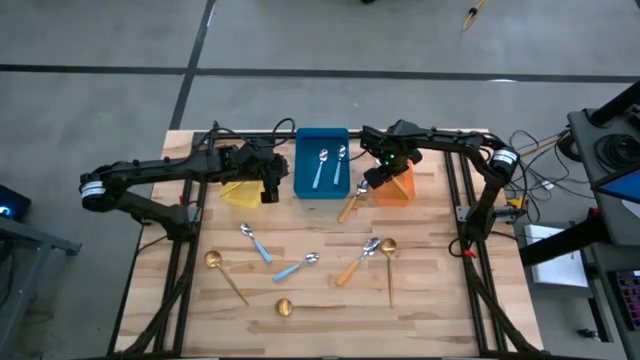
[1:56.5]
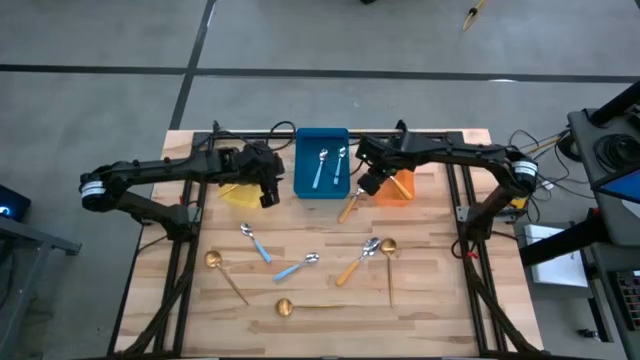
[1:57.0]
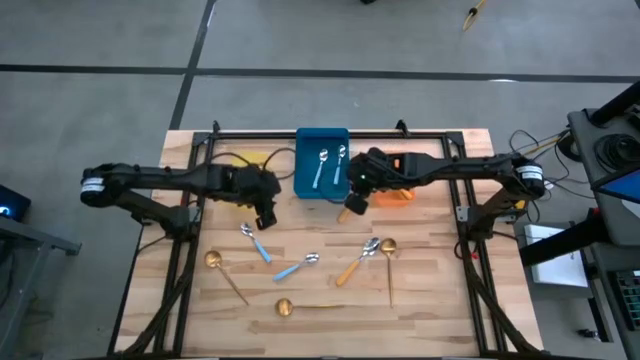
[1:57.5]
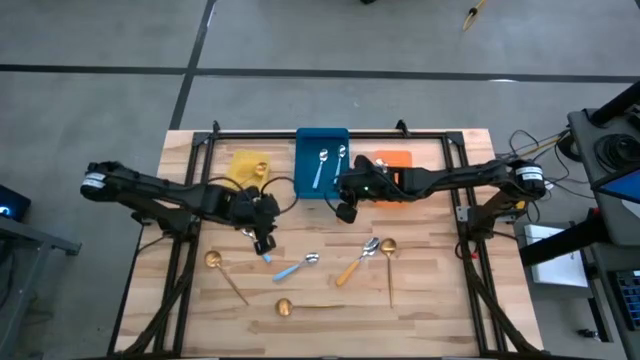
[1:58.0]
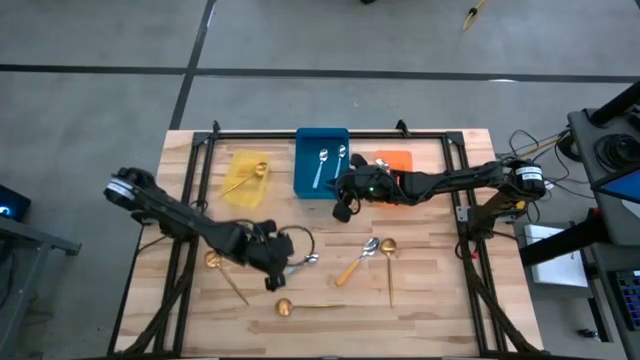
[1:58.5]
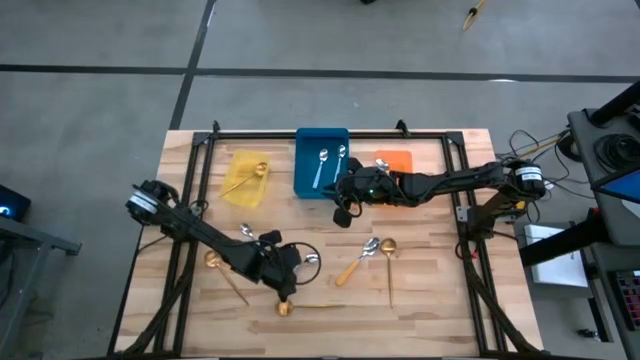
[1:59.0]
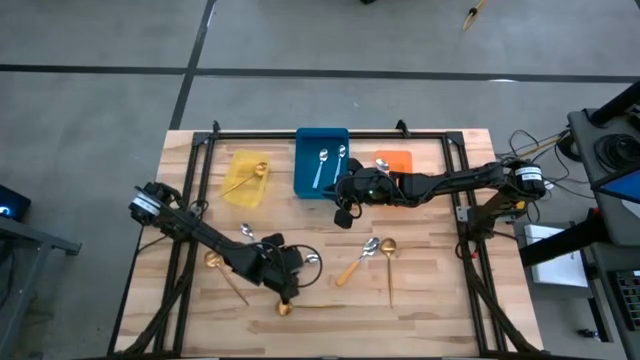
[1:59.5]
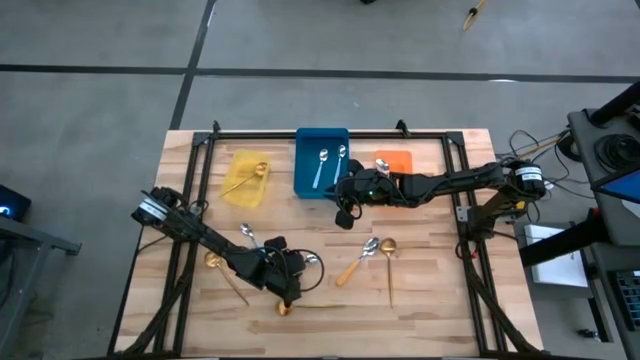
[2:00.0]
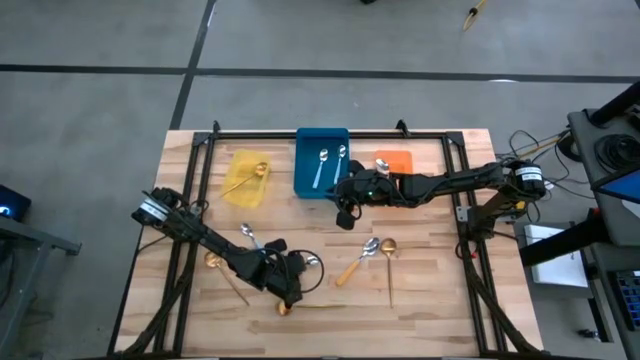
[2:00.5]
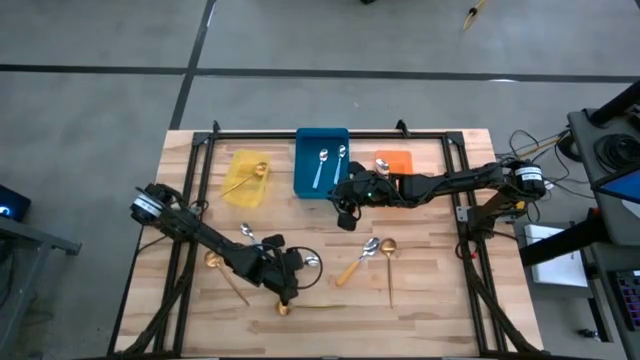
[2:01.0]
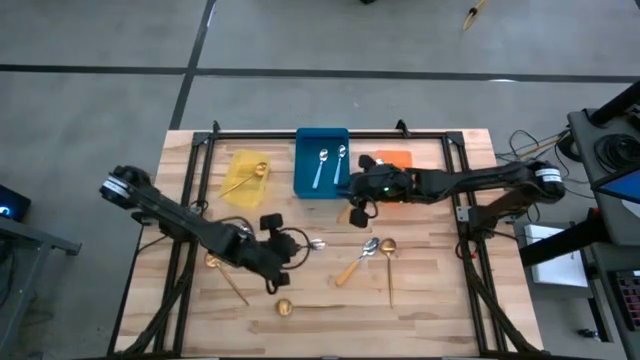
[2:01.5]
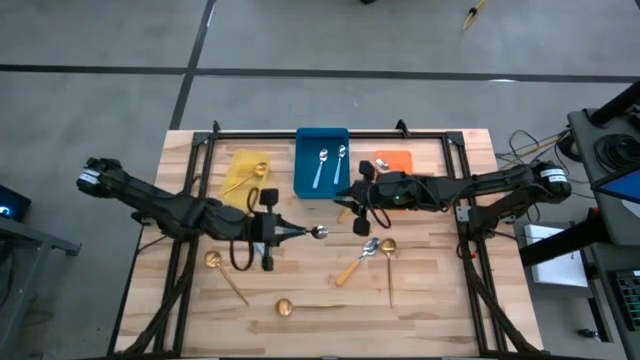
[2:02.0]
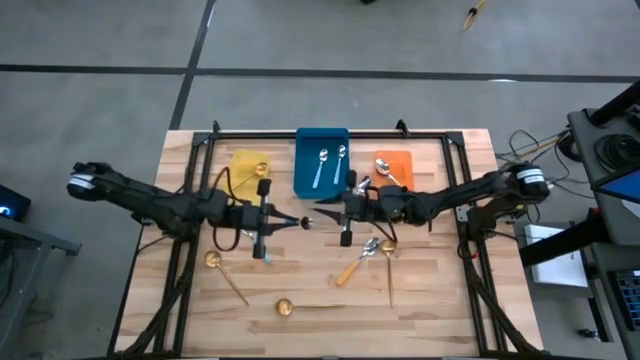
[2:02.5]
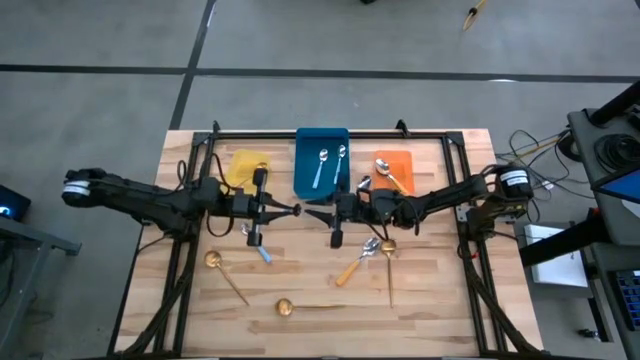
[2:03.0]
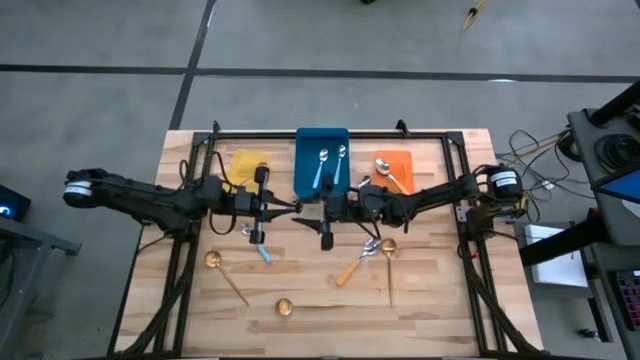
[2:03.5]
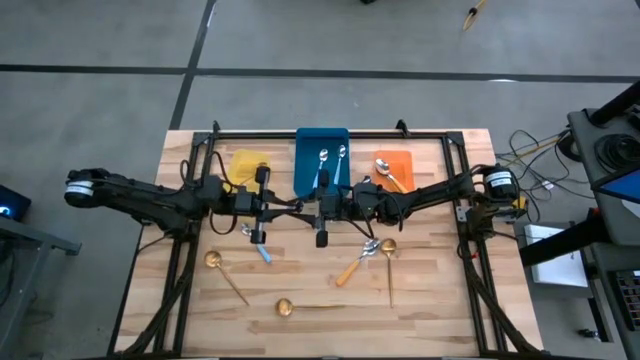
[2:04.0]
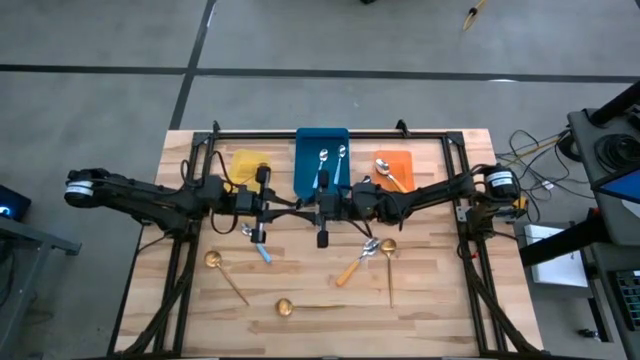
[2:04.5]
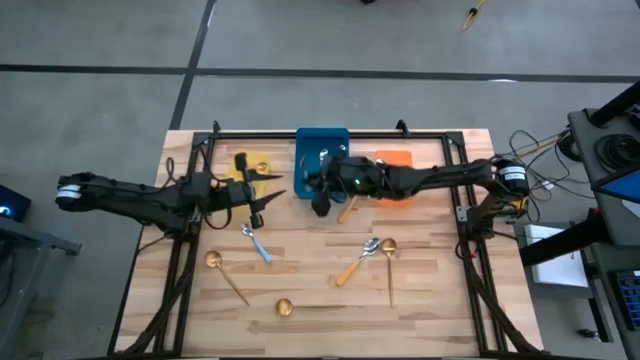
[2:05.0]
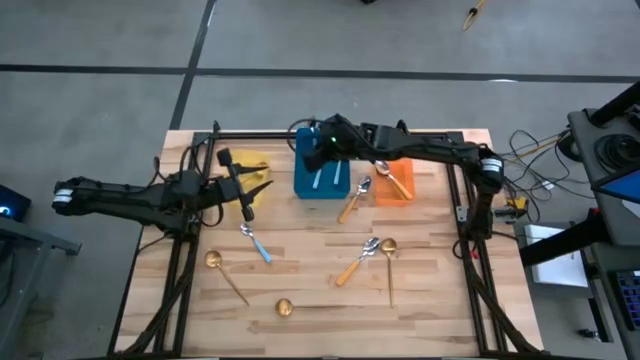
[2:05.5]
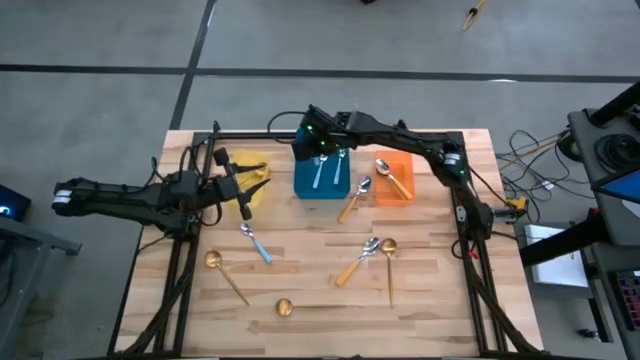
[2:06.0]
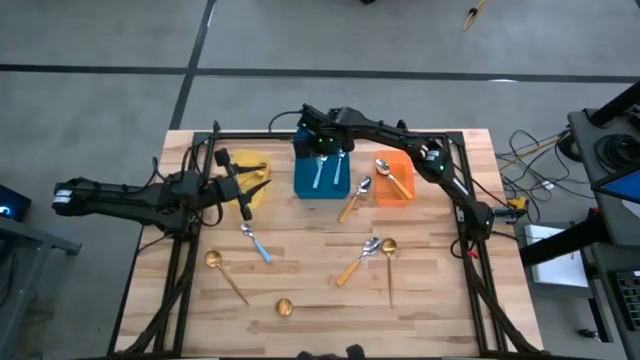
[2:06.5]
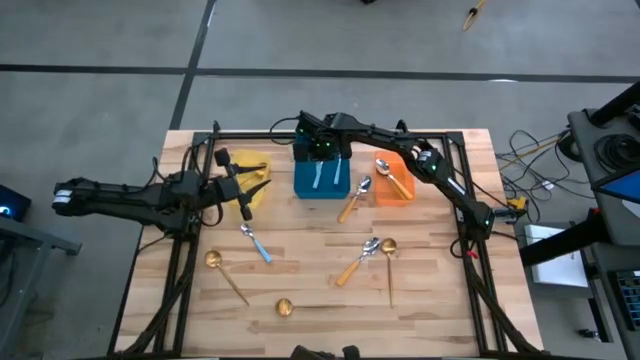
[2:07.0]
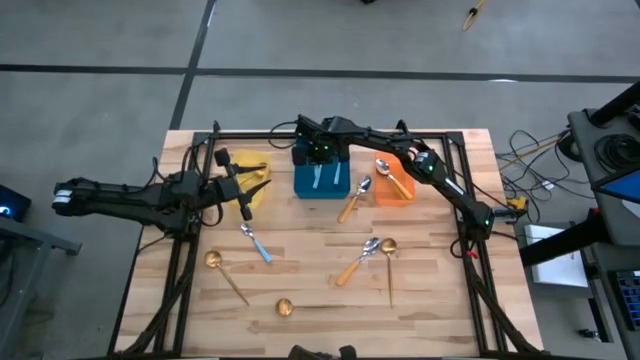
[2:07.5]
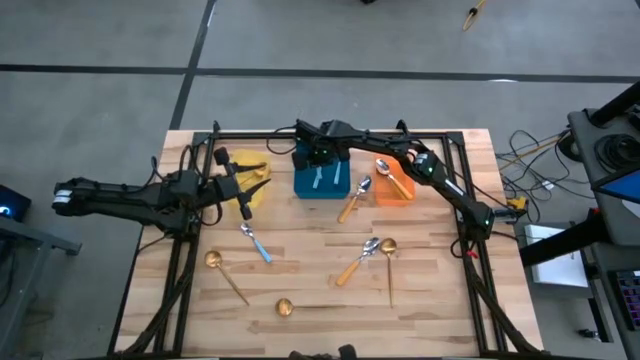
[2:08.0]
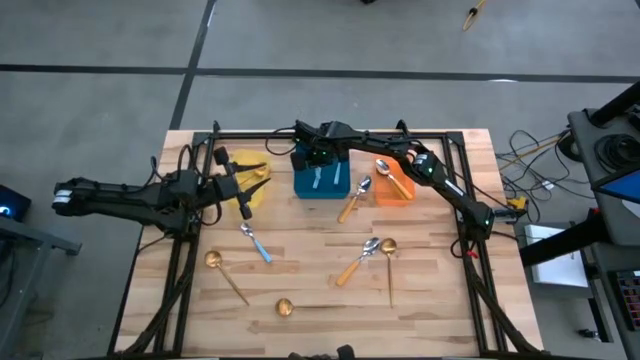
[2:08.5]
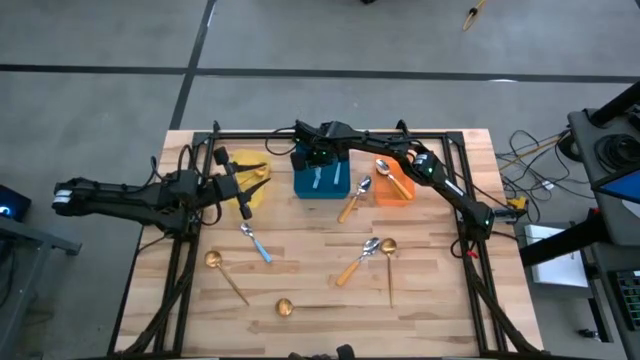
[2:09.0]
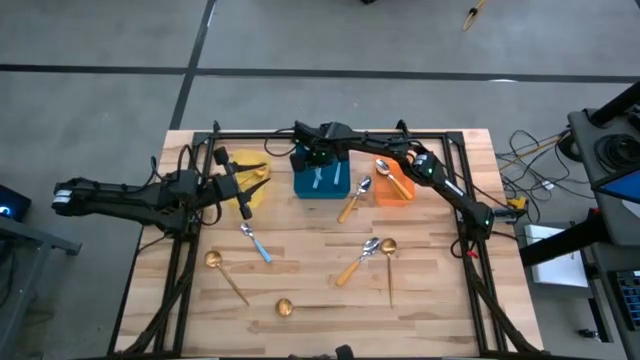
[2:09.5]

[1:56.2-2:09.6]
Task: Sort silverware by color (type)
Put the blue spoon into the blue bin

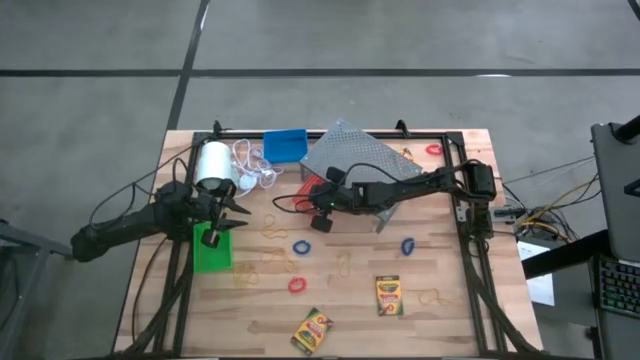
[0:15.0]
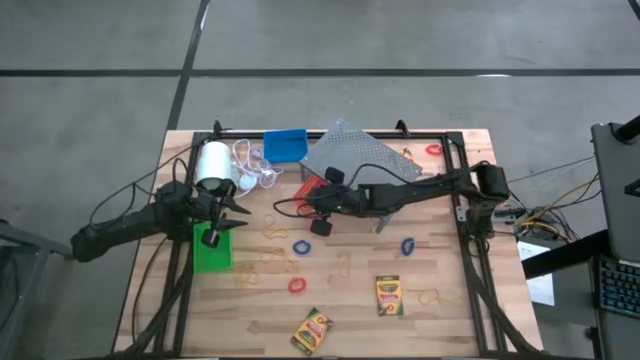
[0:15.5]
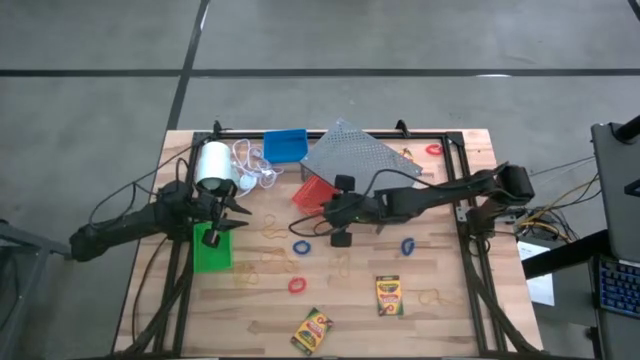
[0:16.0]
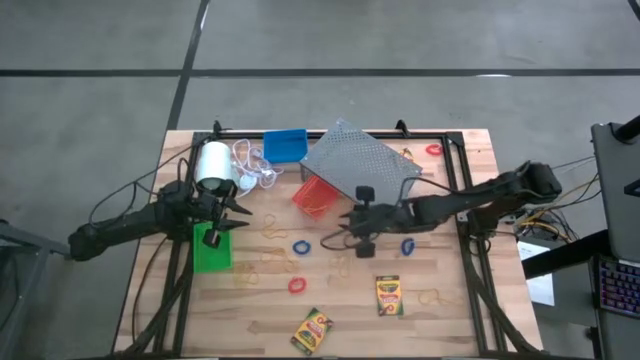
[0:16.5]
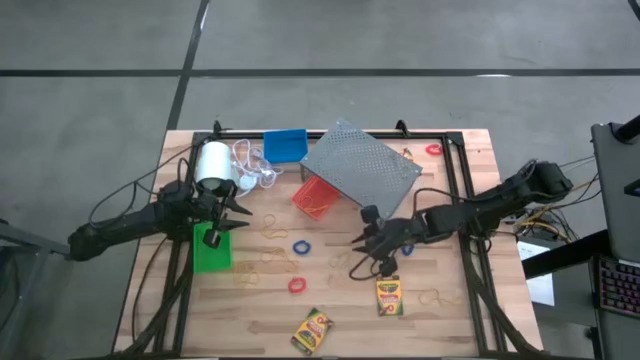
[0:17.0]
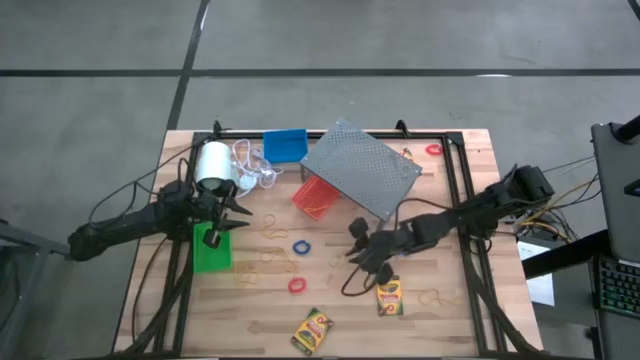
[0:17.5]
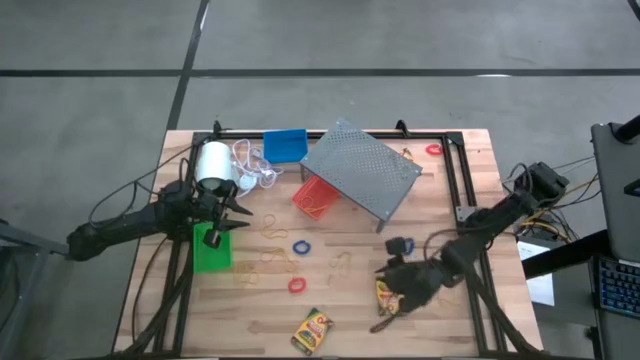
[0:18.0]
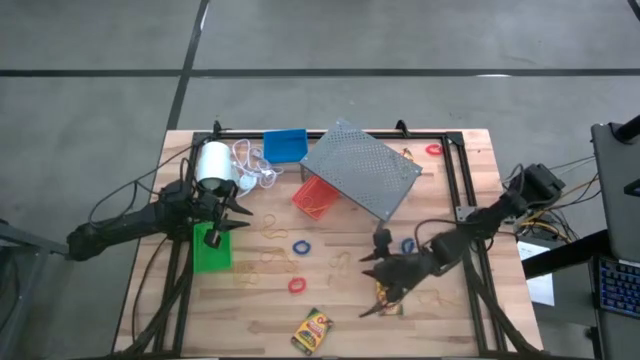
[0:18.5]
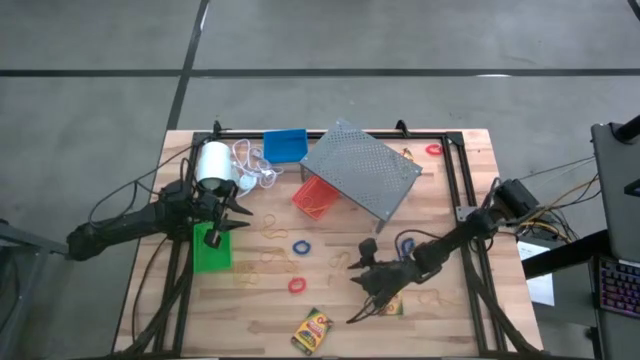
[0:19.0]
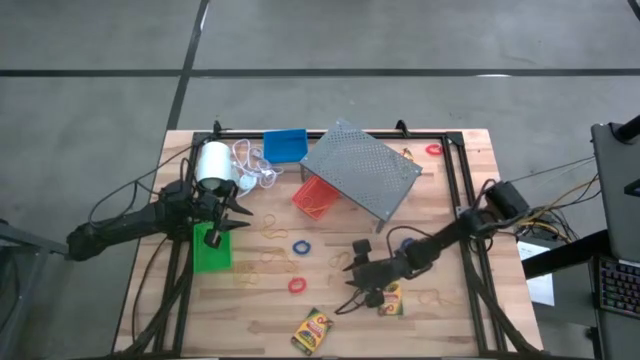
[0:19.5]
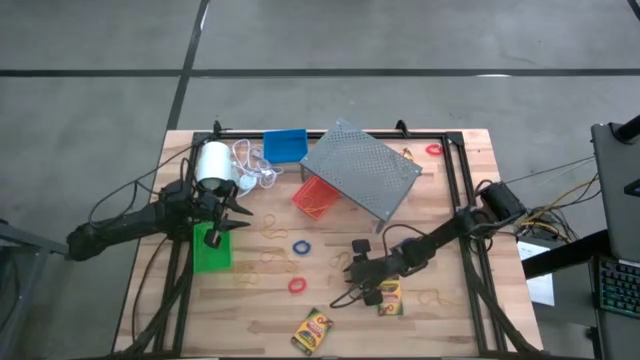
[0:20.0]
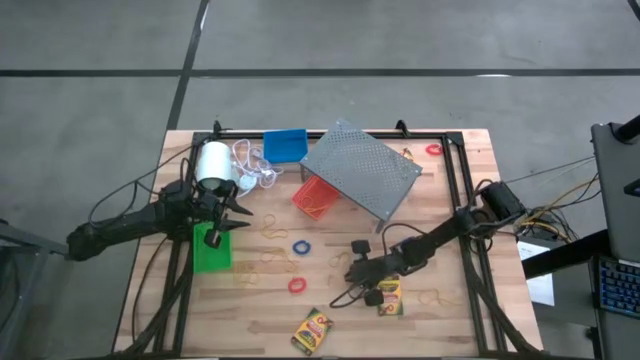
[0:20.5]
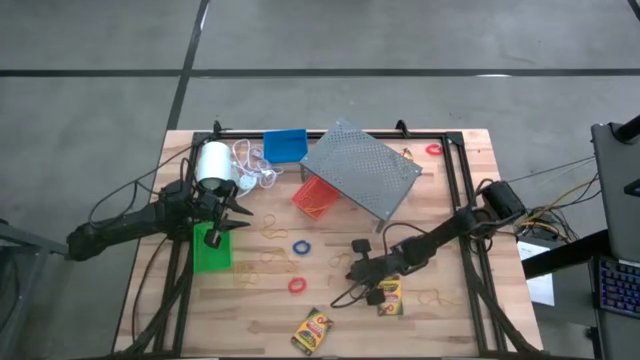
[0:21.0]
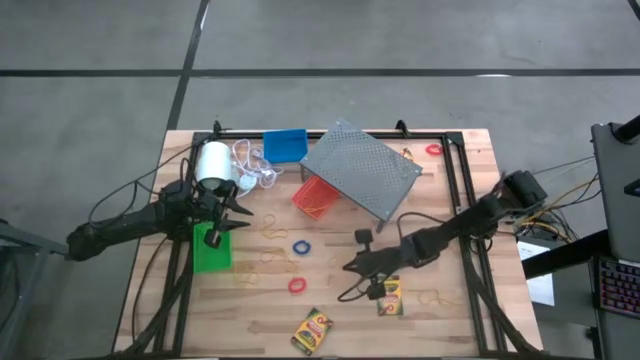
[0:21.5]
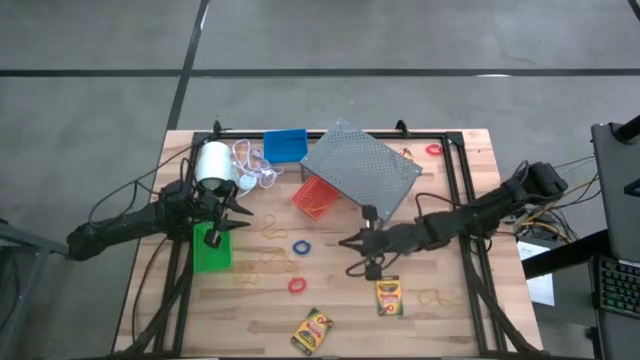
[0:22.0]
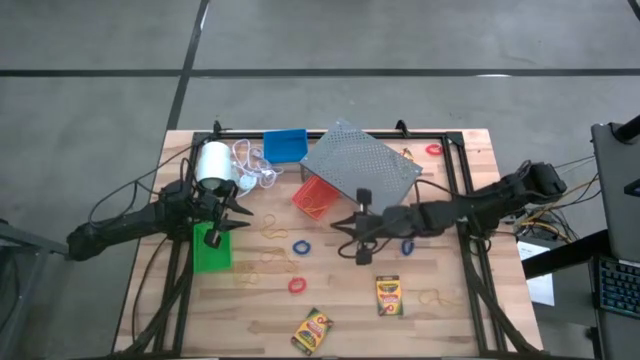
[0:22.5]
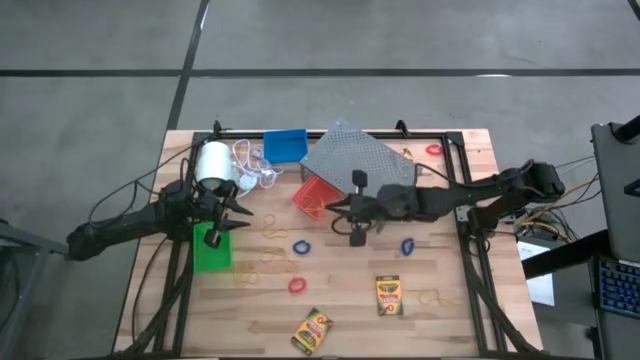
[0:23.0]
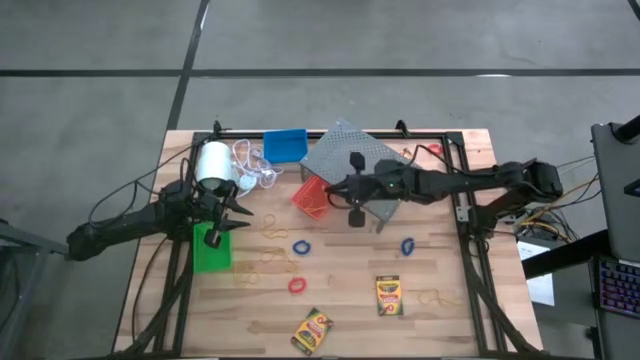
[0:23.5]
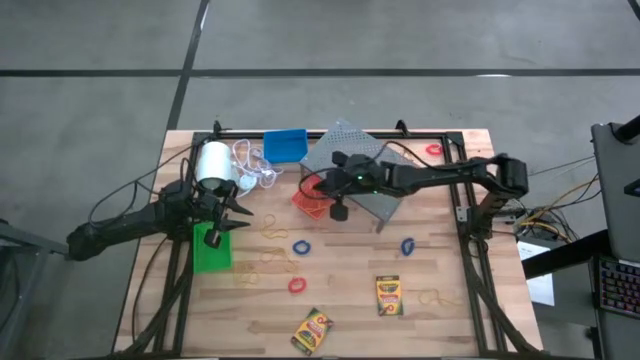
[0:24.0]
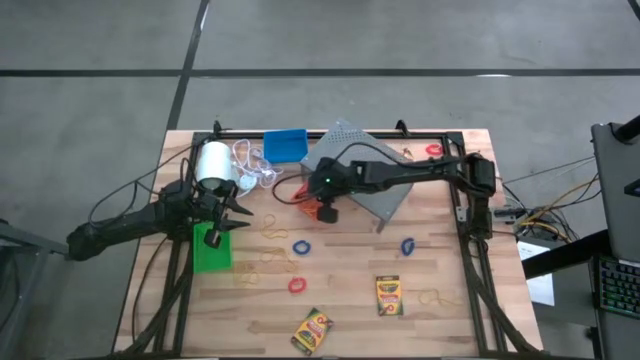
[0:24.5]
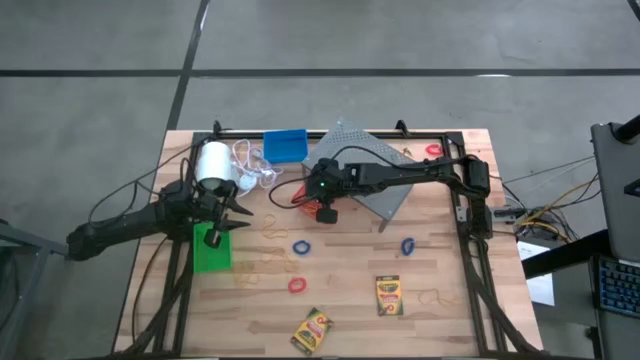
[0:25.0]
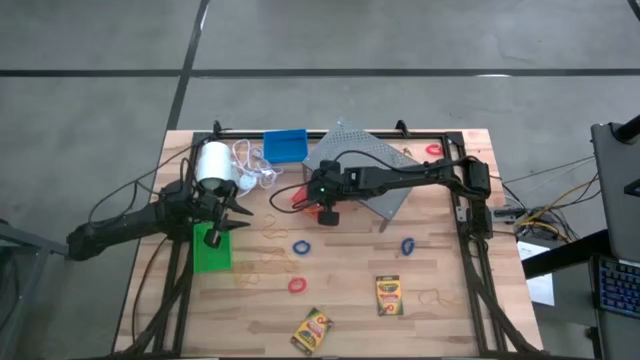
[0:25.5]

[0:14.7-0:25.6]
Task: Pick & Place Office Desk Supplies
Put the yellow rubber band into the orange bin
